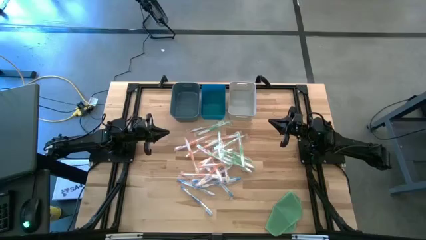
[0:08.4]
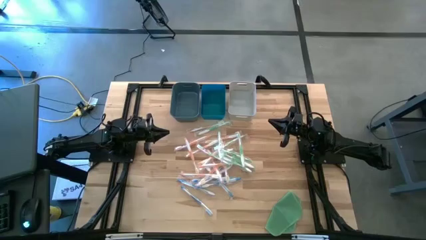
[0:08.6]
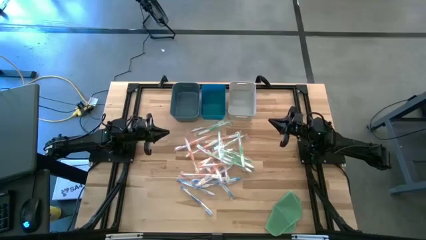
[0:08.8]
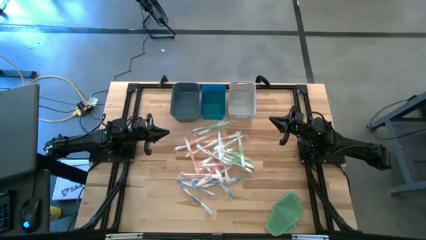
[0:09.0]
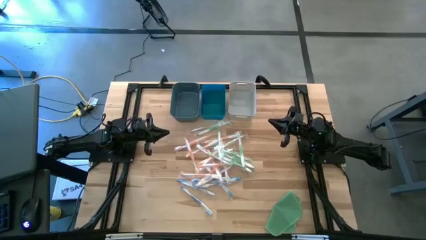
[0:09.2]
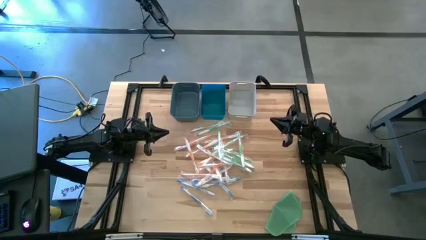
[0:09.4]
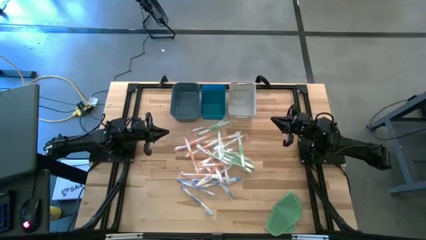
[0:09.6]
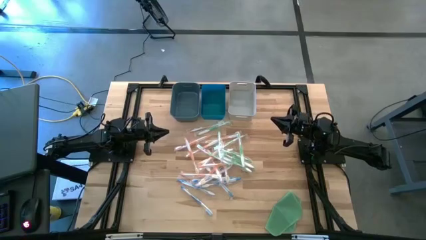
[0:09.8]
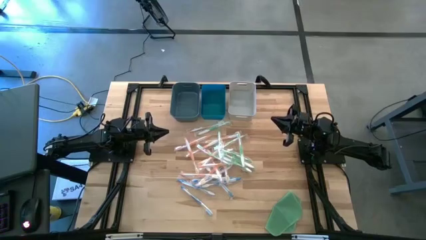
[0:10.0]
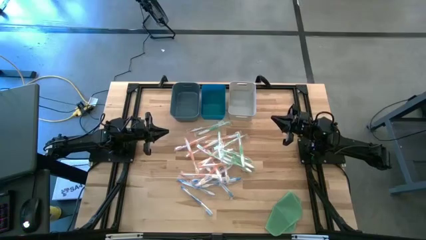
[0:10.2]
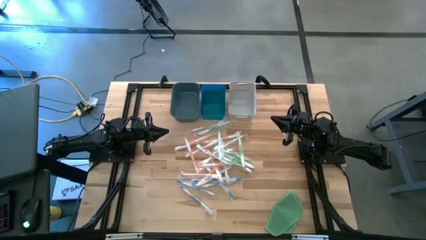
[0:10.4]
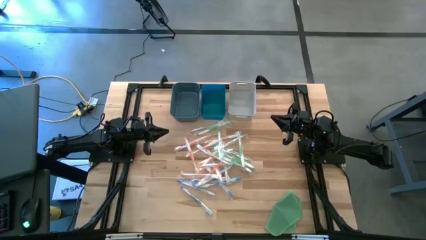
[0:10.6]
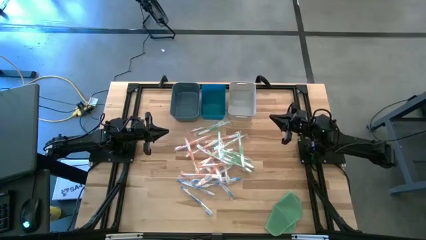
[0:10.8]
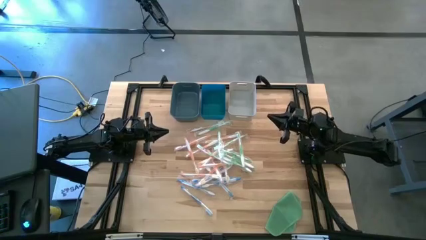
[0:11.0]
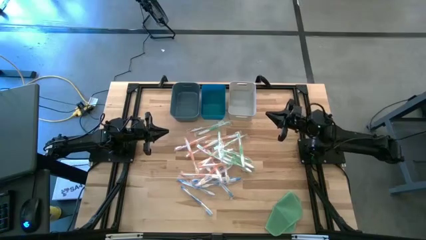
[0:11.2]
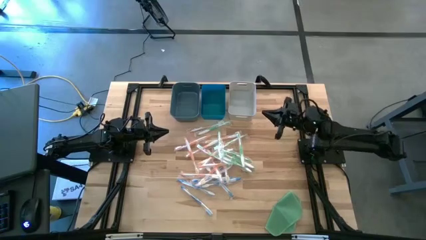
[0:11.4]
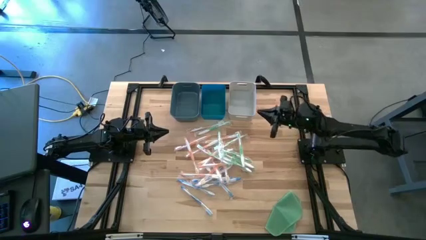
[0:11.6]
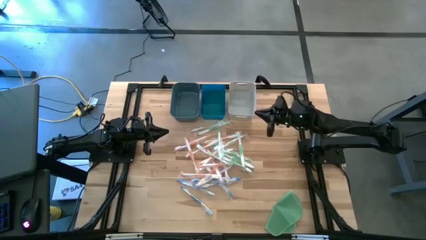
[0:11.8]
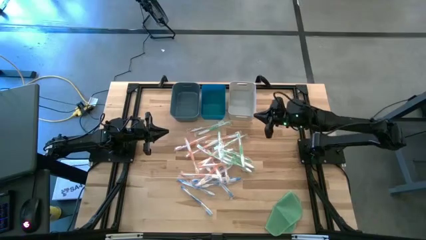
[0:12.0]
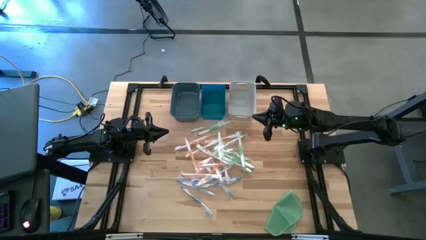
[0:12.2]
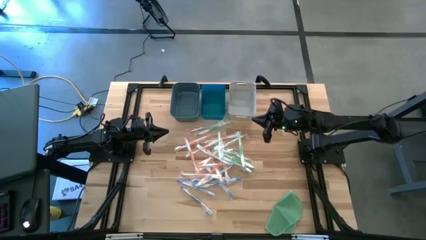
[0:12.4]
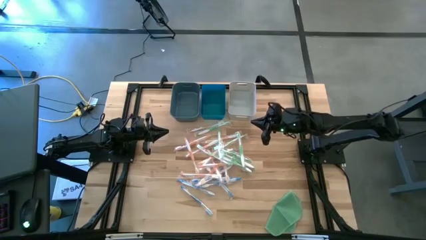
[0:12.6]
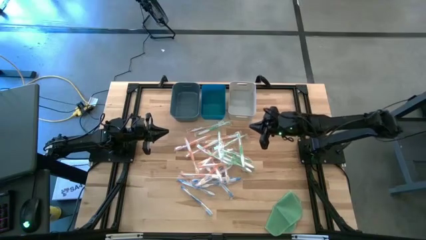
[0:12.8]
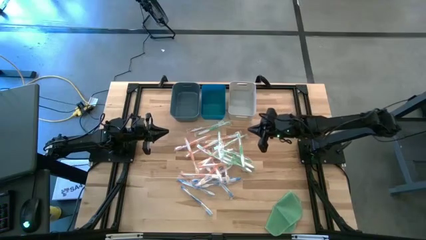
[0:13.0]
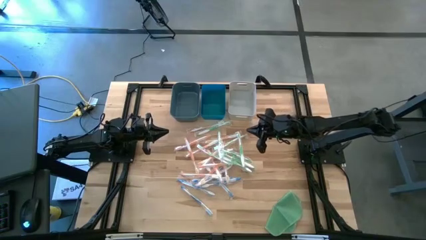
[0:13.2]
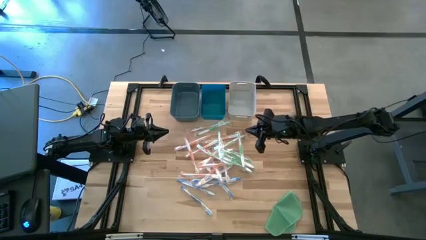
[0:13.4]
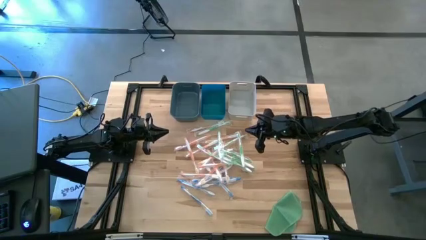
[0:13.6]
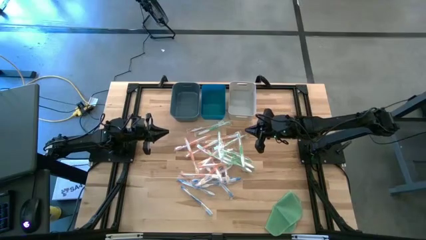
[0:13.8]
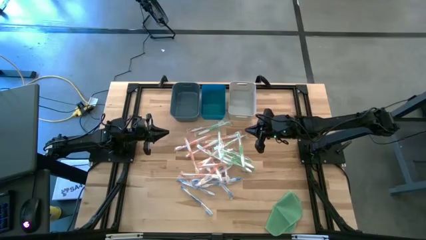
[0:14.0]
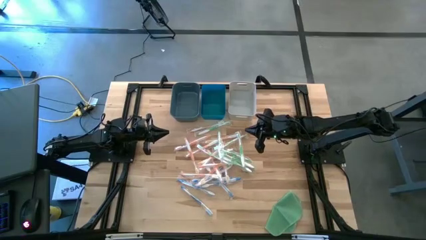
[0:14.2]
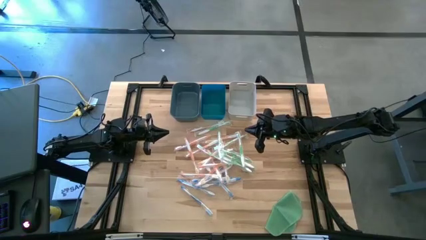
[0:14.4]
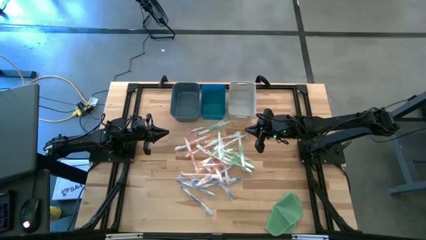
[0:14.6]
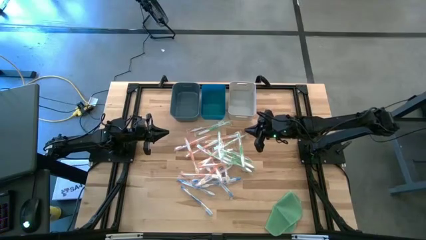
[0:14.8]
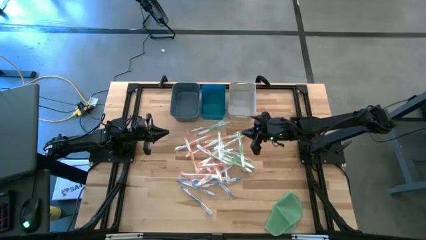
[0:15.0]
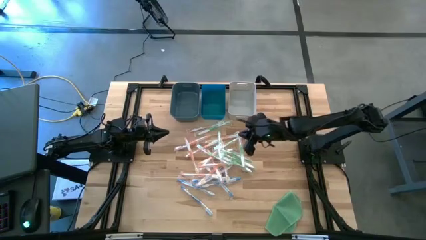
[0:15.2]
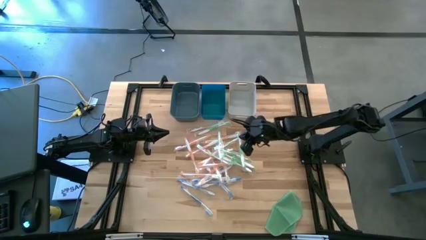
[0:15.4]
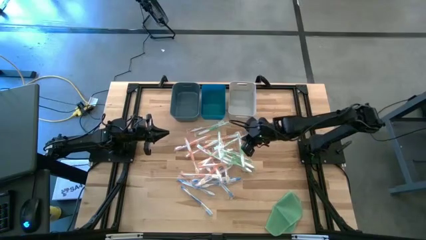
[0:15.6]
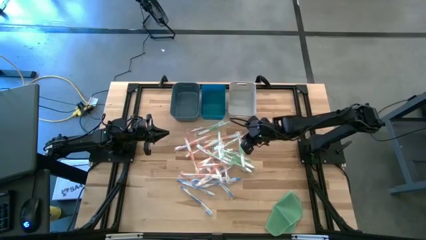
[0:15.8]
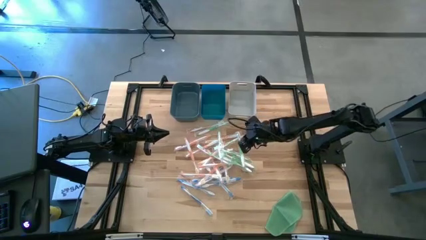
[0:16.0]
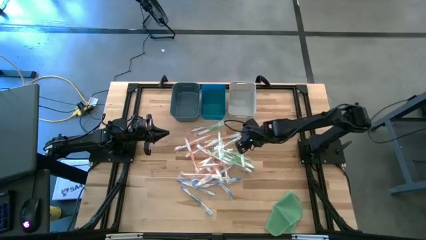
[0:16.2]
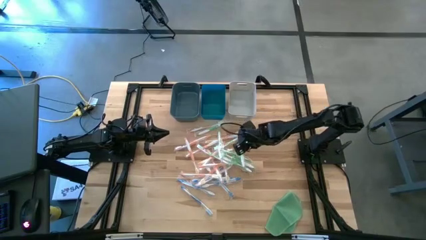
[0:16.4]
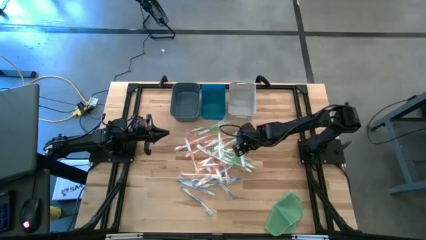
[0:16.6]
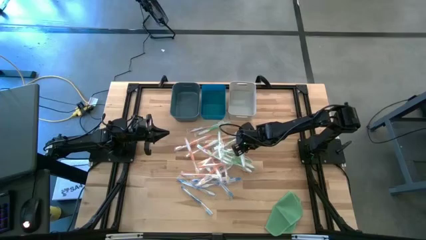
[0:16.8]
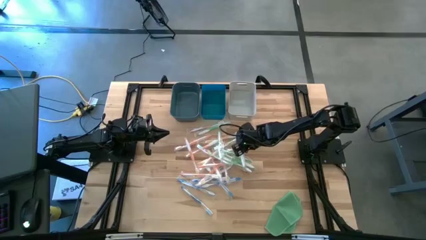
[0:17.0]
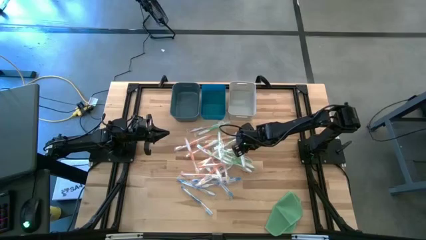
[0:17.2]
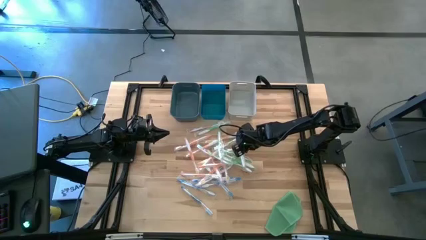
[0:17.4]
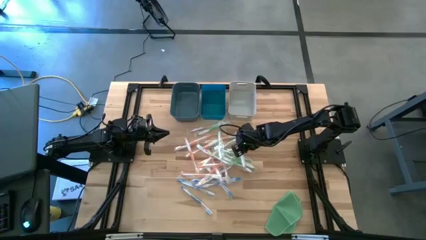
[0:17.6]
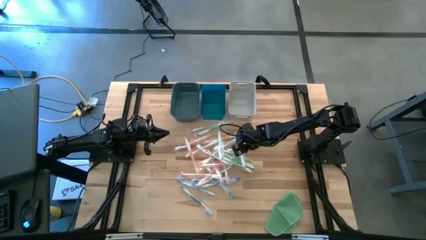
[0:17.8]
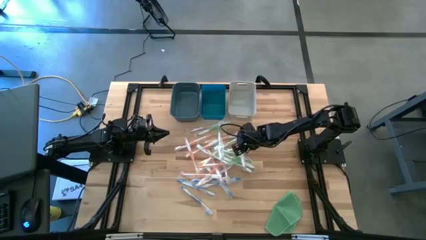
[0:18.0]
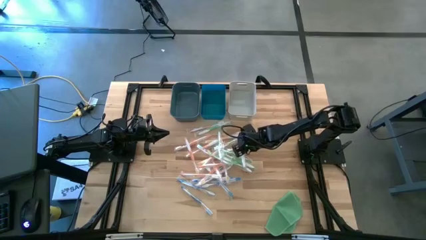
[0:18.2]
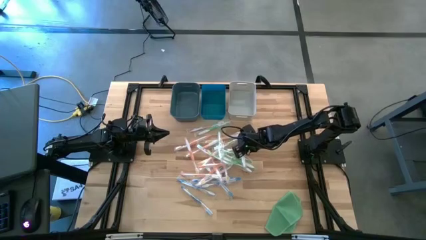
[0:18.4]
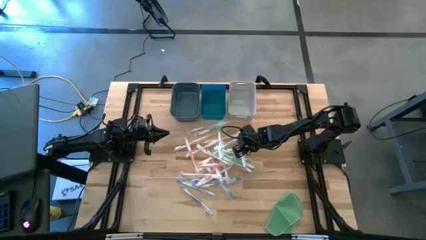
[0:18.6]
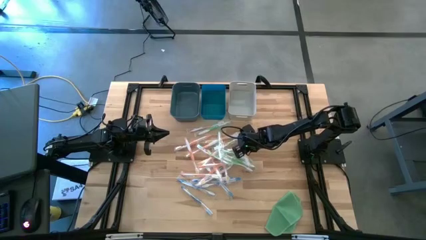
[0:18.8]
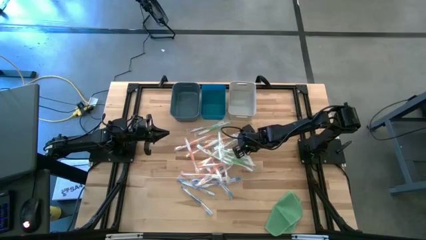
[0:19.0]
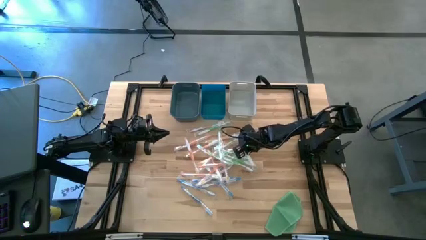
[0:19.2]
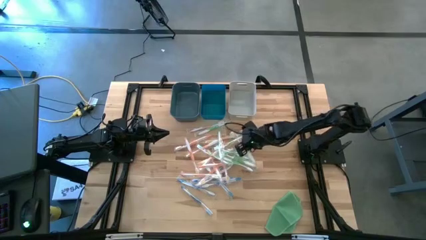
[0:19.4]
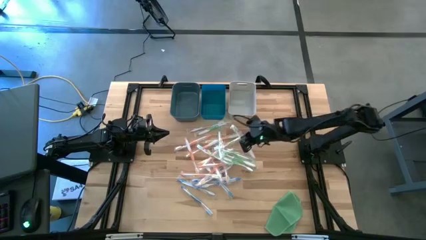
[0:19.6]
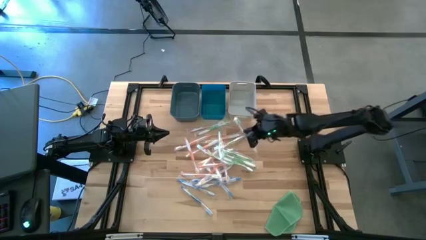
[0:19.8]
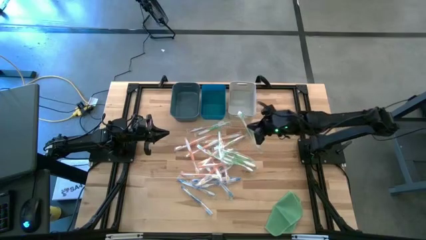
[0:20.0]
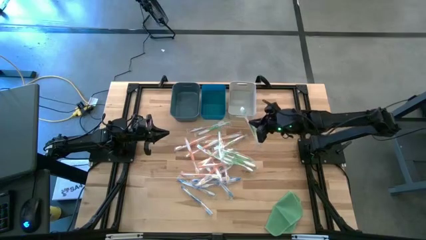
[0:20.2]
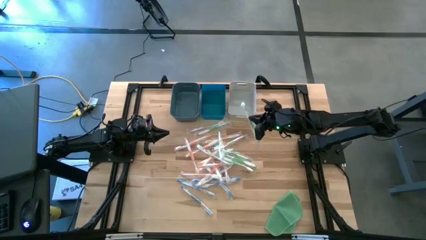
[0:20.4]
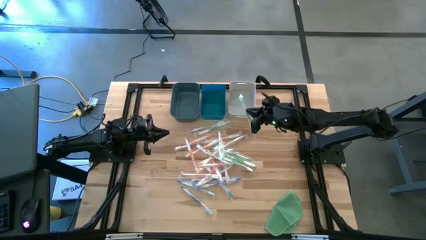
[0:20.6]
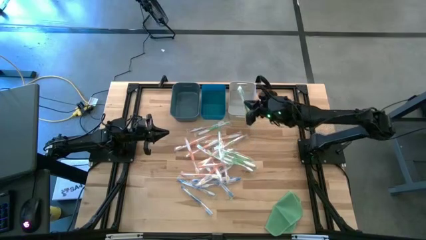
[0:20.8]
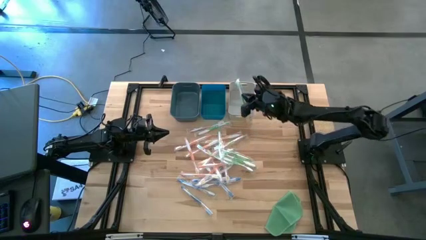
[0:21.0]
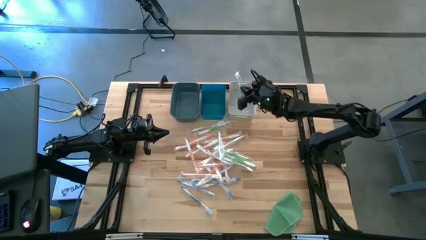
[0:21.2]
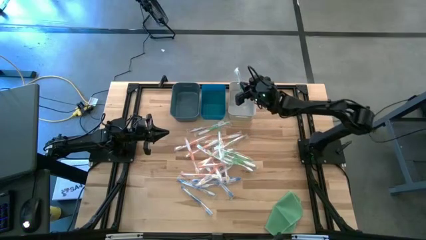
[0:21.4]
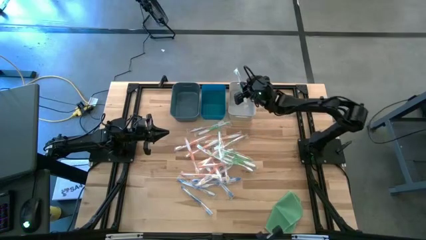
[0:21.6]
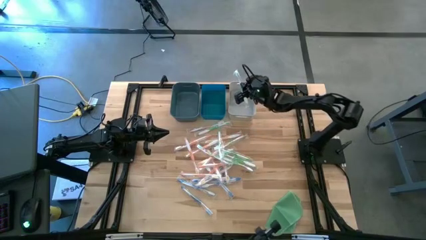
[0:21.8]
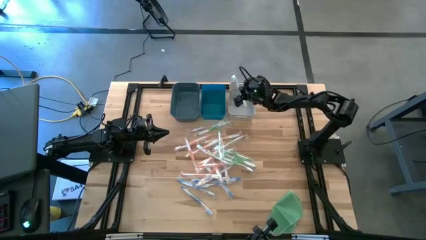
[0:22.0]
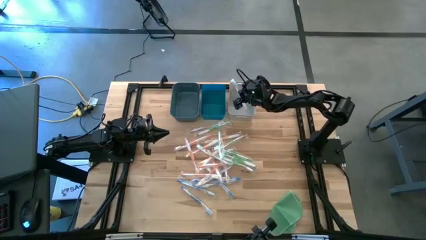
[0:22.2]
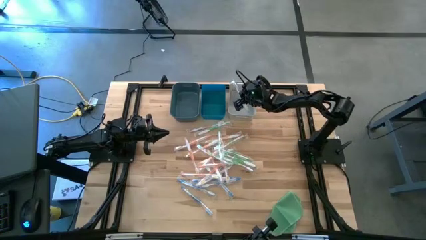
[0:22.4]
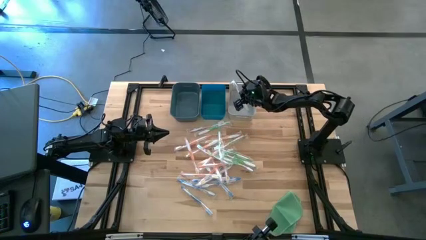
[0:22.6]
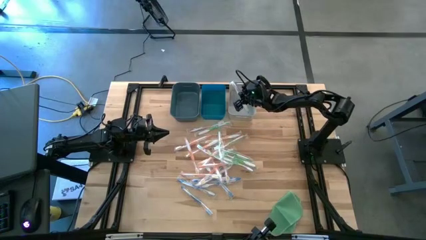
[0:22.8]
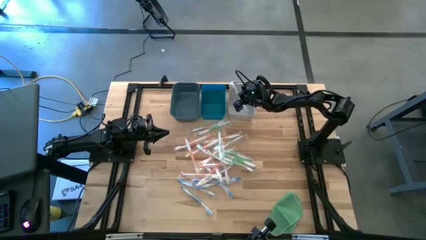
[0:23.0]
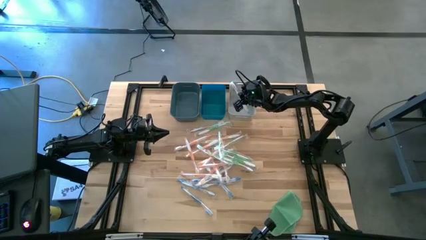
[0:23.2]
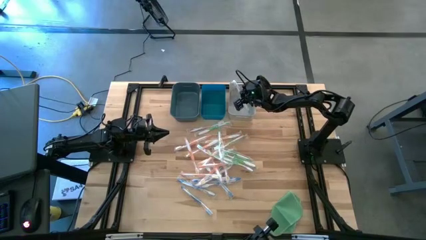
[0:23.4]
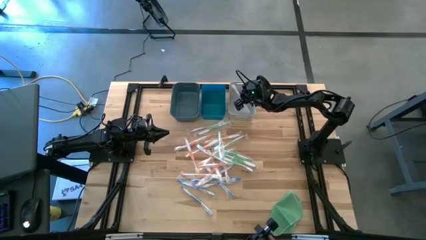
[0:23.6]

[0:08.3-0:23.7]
Task: Pick & Place Toothbrushes
Put the green toothbrush into the white bin

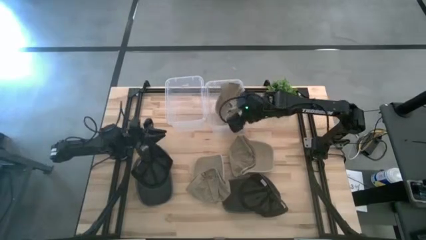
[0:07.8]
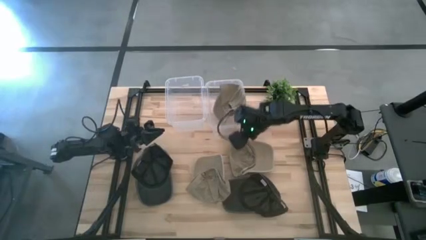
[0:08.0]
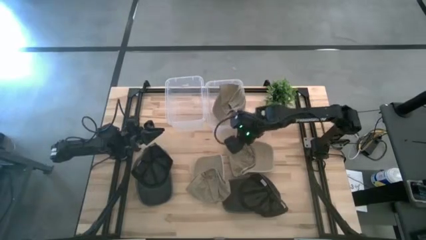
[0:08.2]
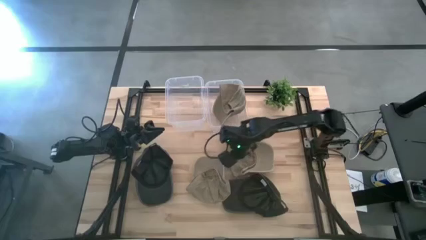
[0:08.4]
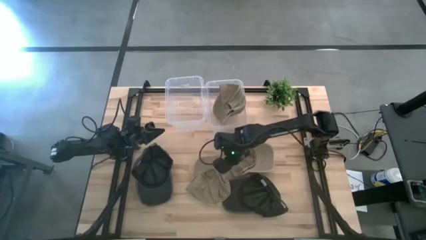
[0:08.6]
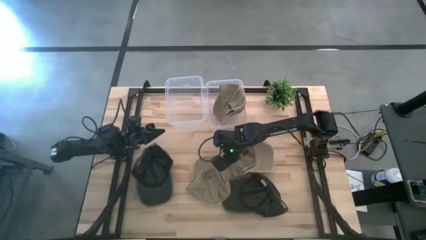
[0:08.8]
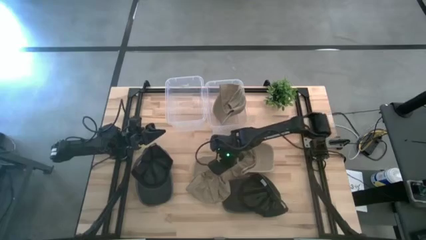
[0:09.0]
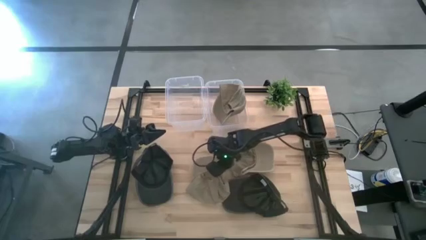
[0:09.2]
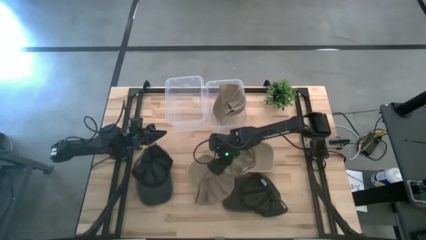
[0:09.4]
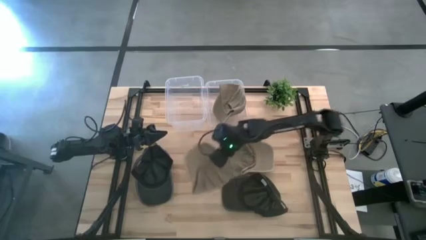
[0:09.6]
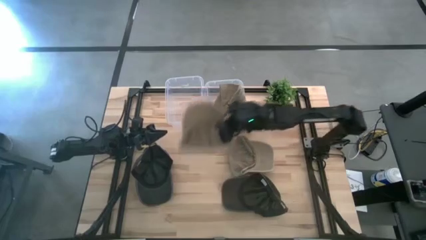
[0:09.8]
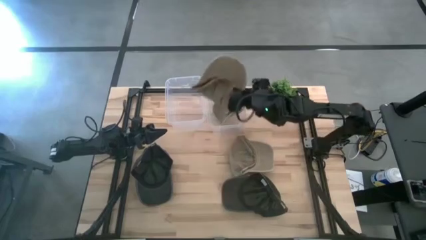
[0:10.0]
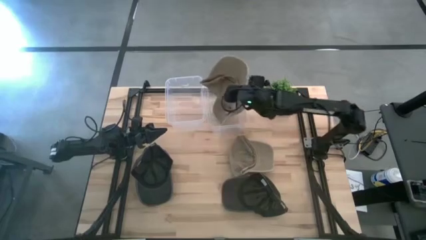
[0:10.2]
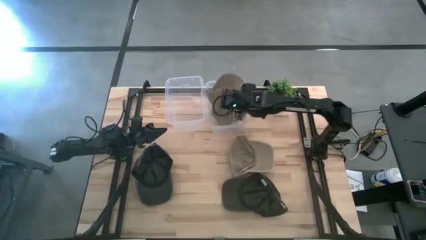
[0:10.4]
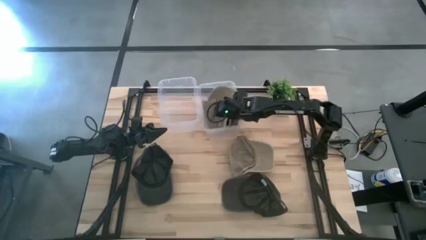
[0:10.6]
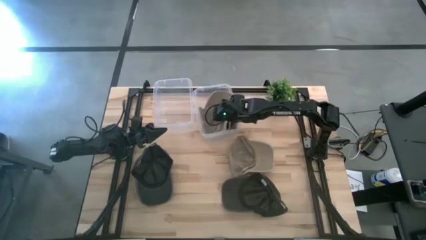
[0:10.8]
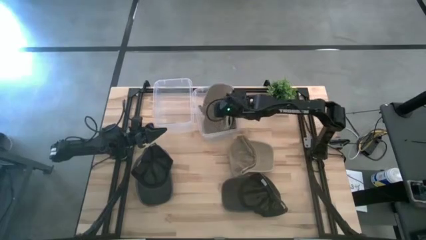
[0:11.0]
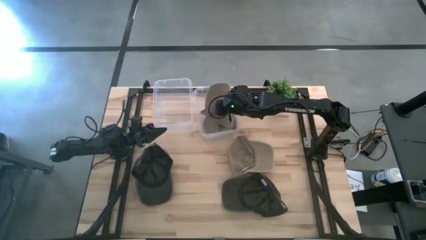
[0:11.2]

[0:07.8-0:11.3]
Task: Pick & Place hat
Put the left brown cap into the right transparent bin
